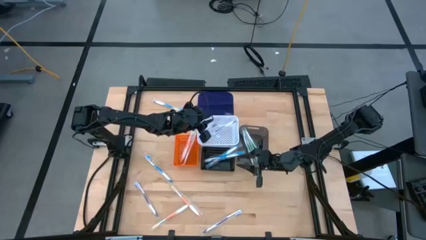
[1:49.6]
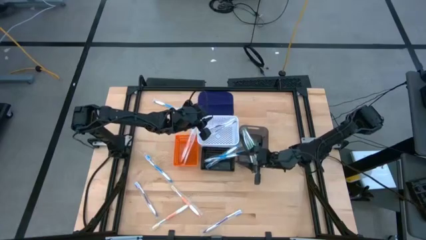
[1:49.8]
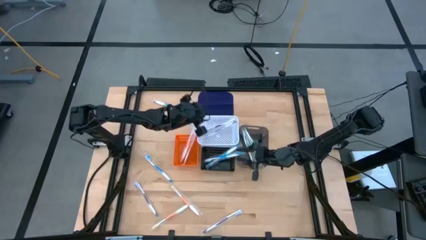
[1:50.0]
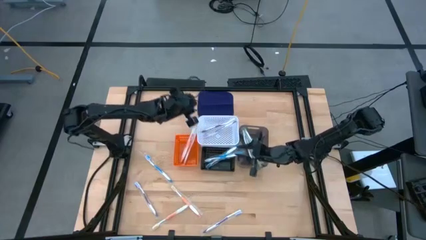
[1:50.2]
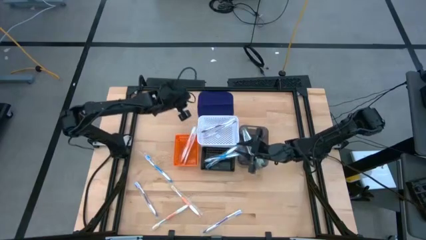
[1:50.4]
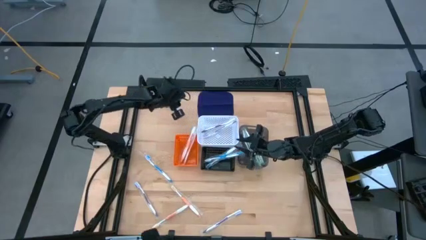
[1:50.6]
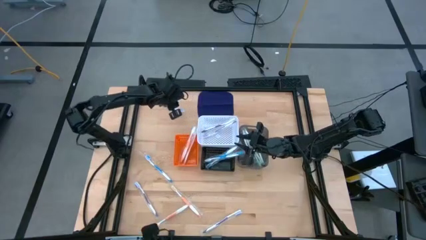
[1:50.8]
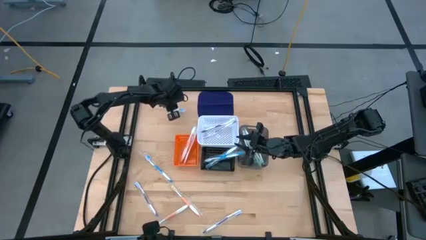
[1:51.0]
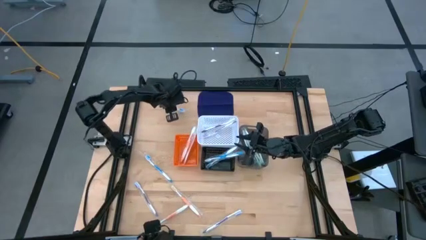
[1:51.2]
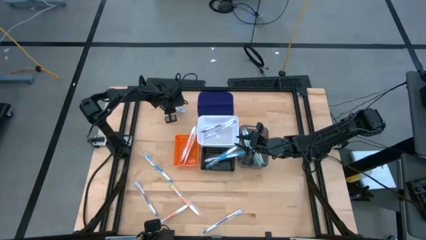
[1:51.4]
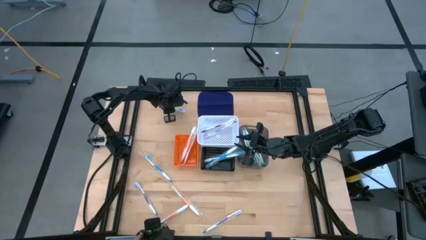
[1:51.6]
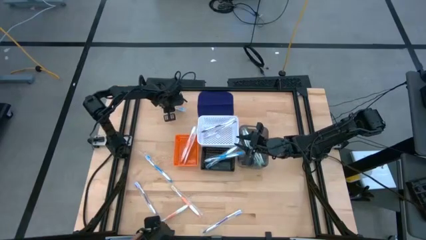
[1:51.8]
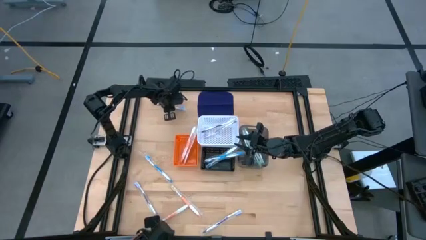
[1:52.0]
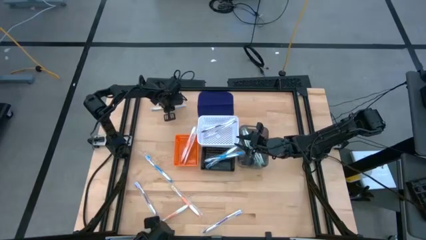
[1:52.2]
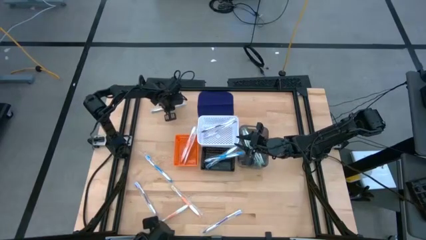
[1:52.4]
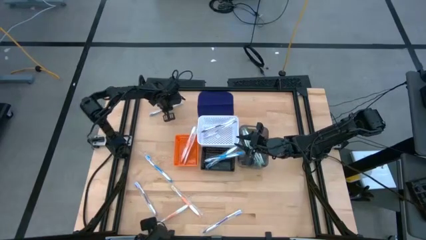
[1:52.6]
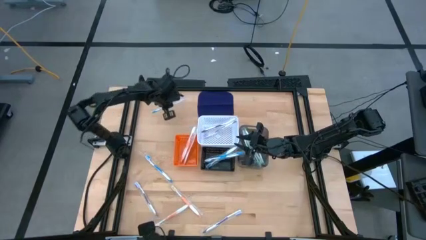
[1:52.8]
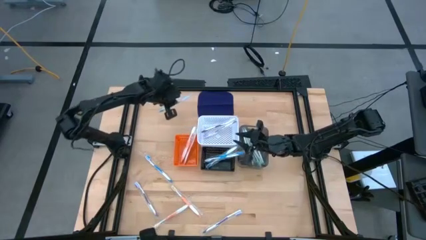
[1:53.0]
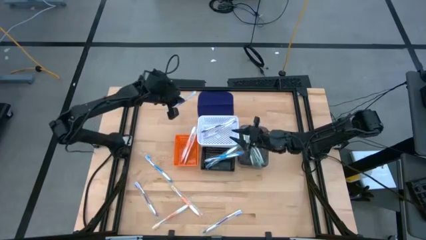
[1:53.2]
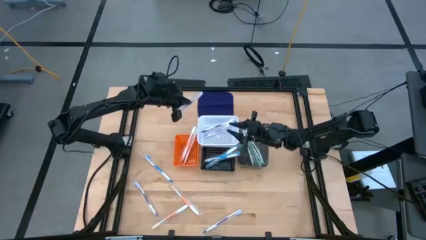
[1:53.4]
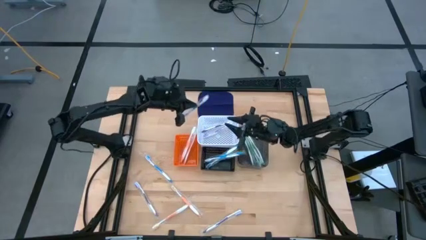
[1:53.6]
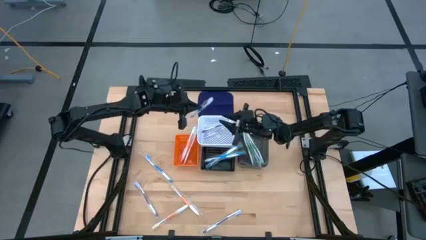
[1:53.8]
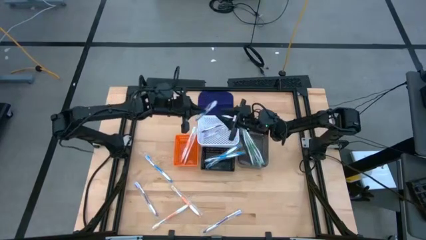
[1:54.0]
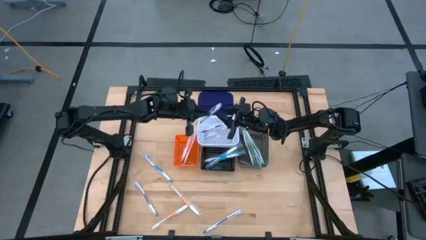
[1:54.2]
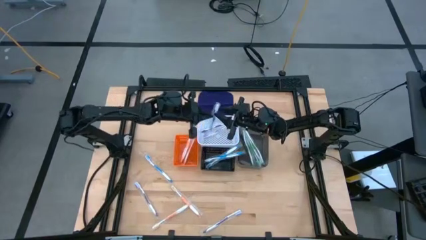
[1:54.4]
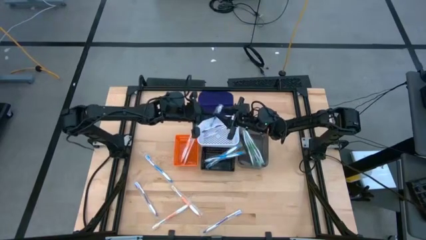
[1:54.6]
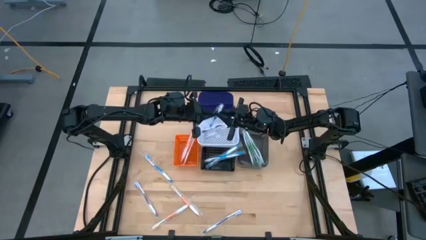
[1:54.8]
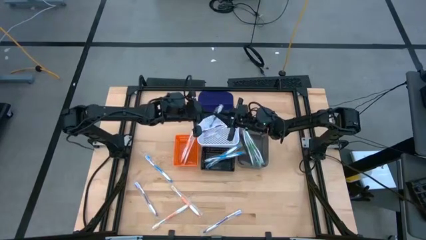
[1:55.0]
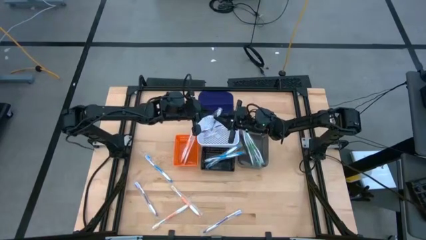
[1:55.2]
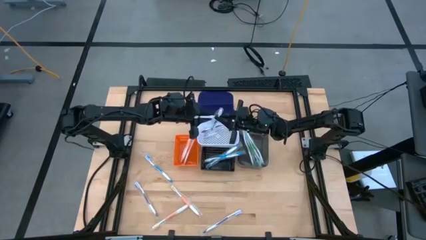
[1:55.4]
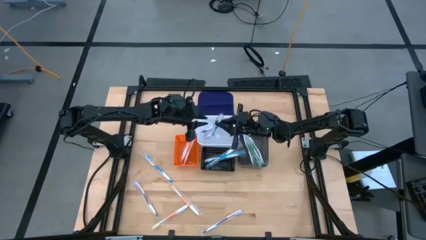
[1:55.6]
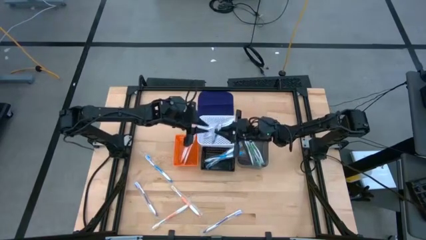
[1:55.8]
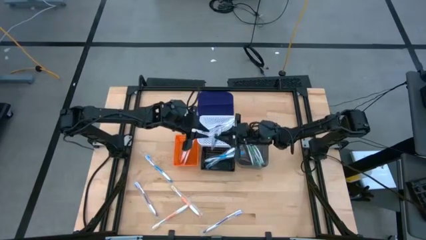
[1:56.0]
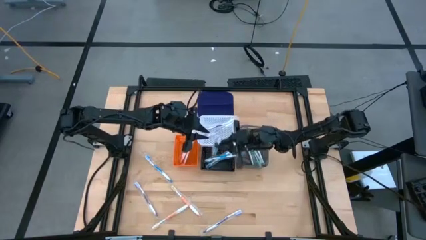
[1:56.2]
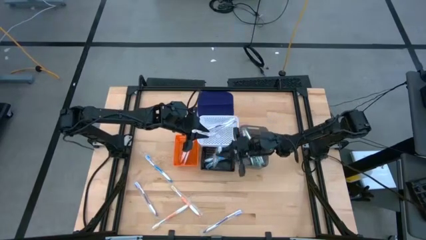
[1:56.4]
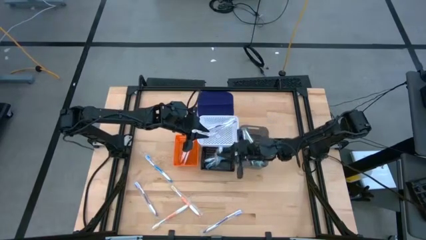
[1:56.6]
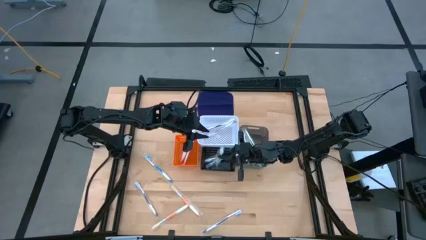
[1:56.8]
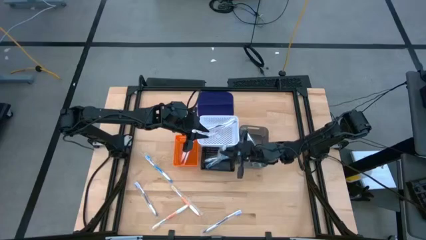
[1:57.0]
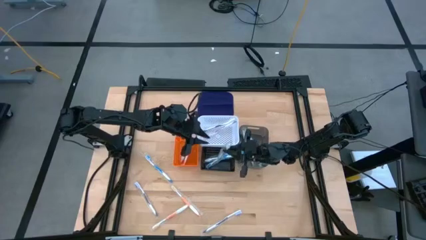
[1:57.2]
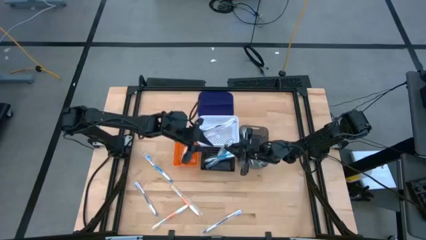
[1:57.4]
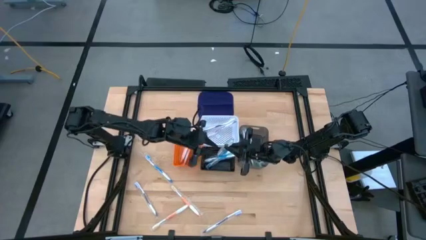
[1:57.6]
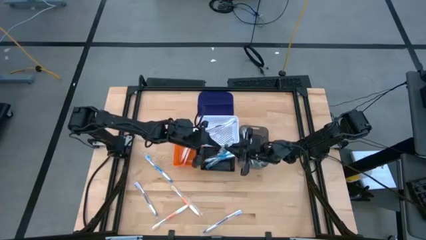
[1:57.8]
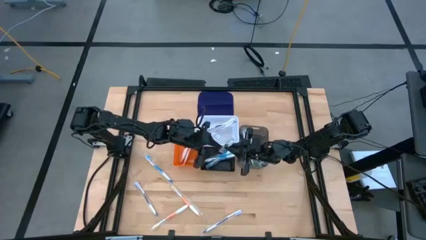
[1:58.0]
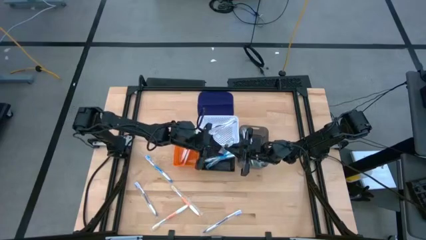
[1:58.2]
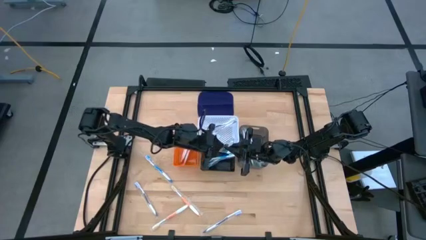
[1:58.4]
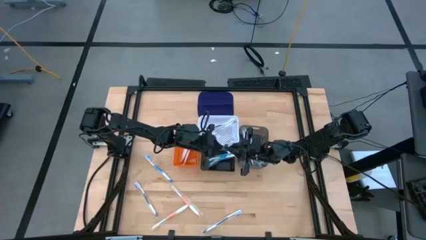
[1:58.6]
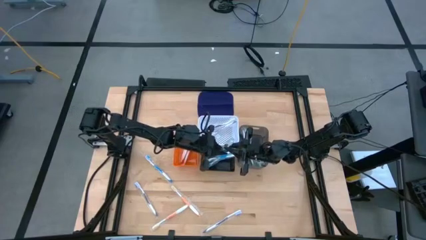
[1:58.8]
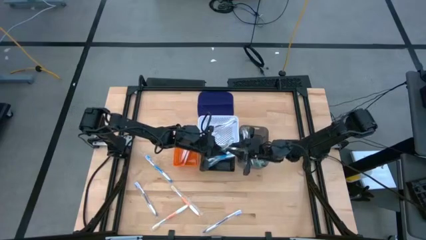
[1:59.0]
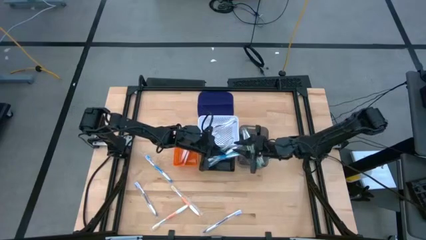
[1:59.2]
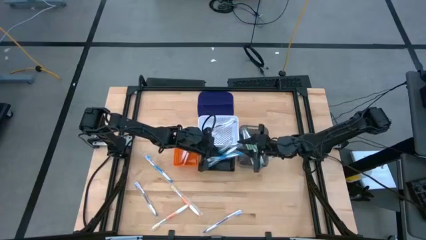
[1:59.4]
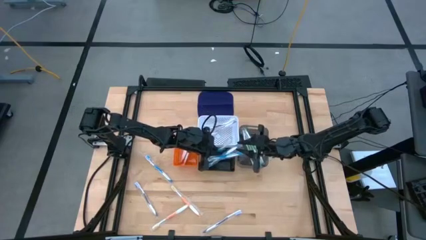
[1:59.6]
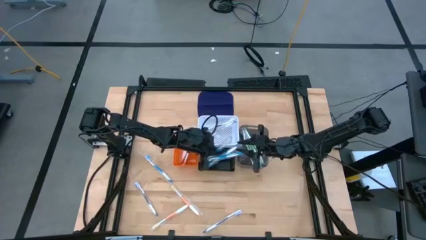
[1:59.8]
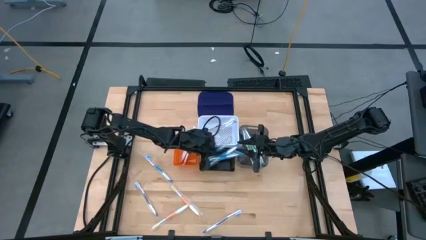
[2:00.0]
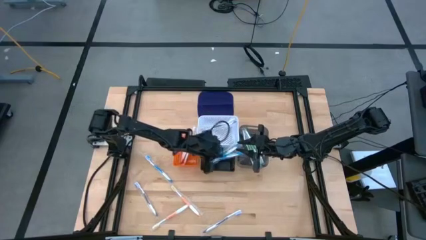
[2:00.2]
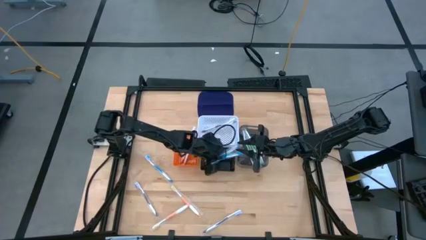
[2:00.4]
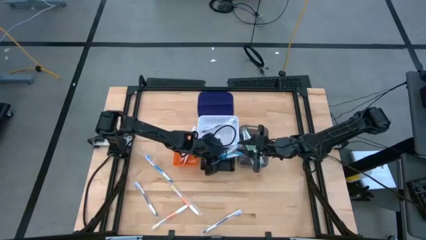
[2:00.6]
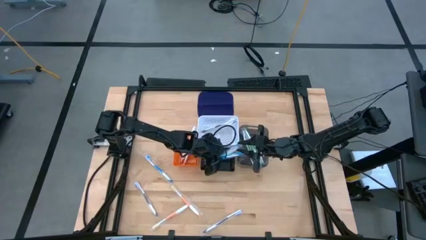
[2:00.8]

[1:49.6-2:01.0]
Task: Pick & Place Toothbrushes
Put the blue toothbrush into the black basket

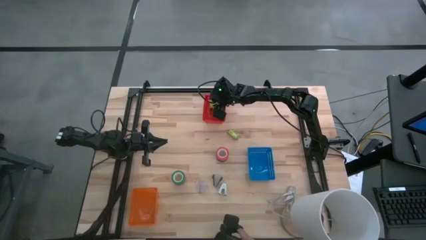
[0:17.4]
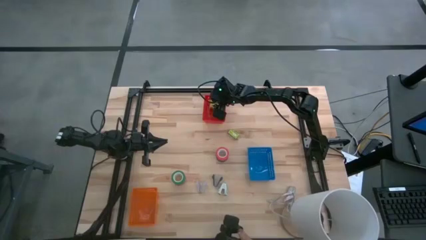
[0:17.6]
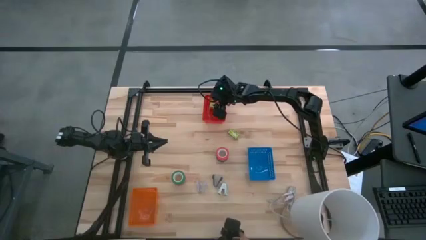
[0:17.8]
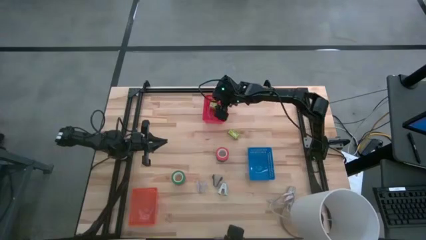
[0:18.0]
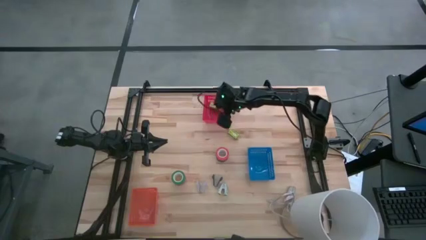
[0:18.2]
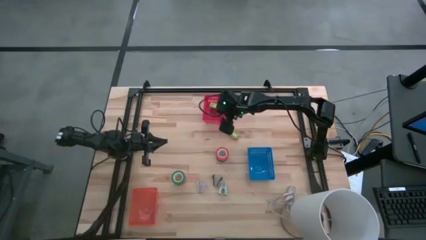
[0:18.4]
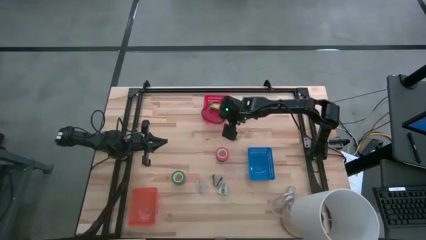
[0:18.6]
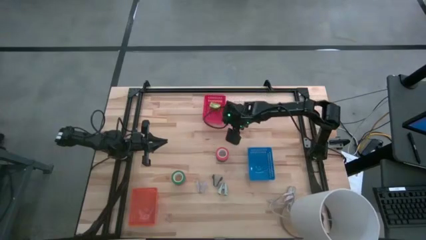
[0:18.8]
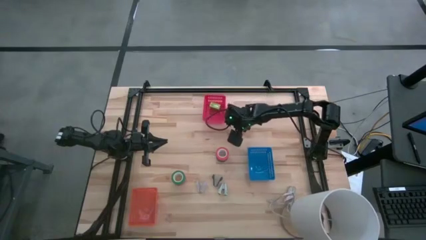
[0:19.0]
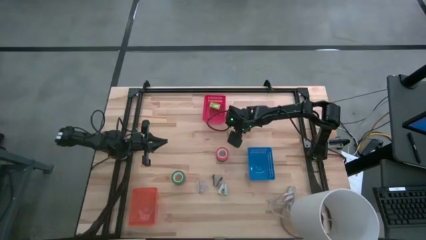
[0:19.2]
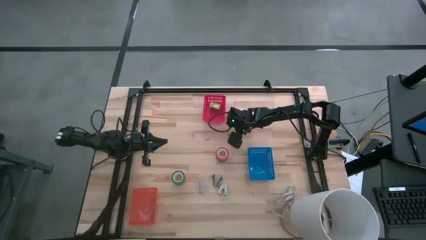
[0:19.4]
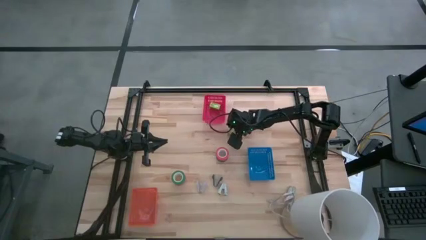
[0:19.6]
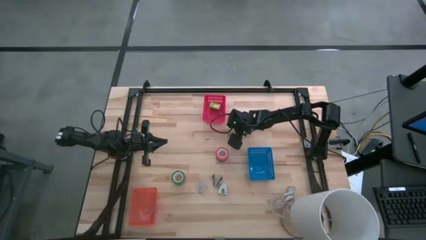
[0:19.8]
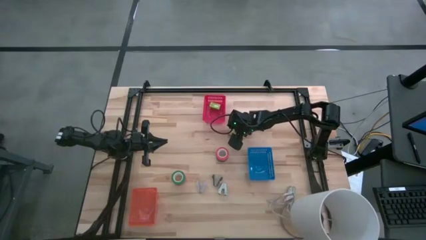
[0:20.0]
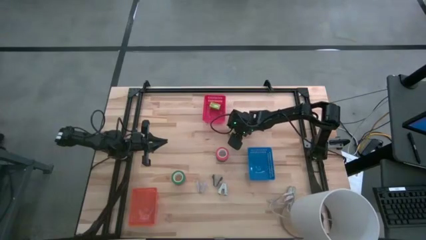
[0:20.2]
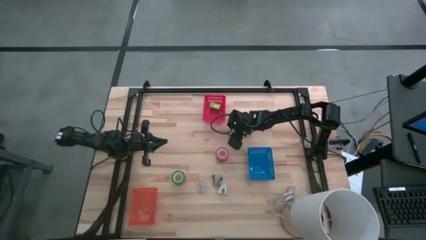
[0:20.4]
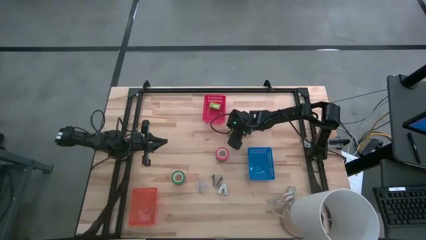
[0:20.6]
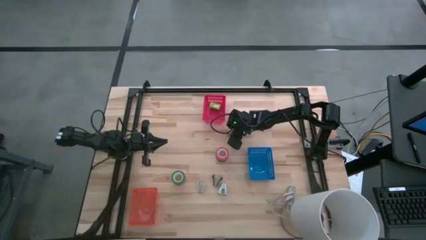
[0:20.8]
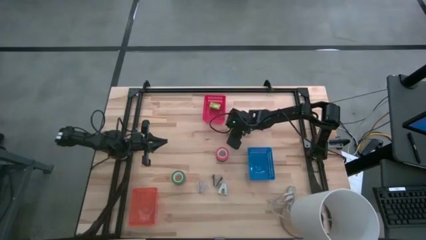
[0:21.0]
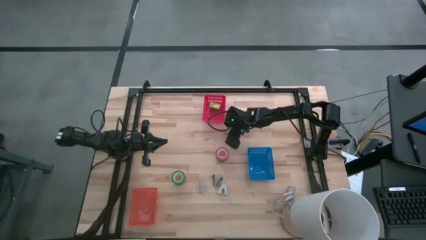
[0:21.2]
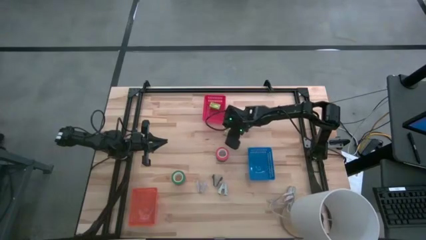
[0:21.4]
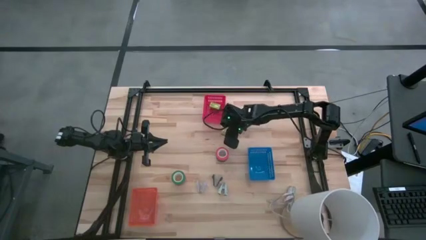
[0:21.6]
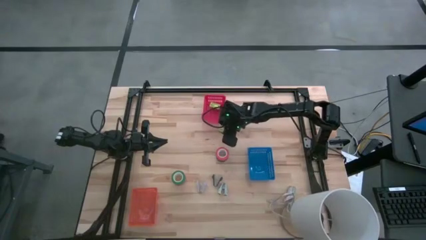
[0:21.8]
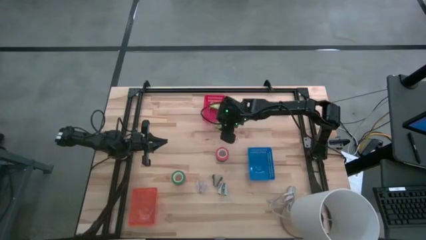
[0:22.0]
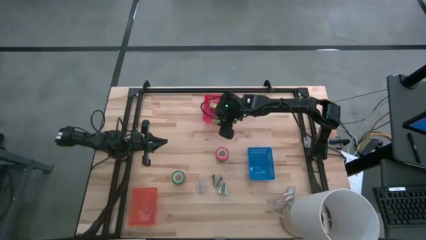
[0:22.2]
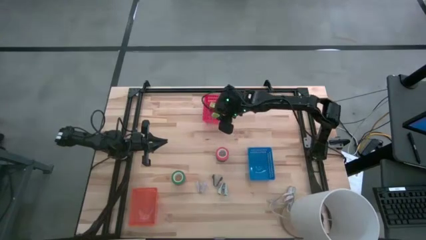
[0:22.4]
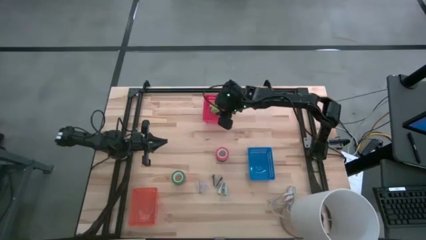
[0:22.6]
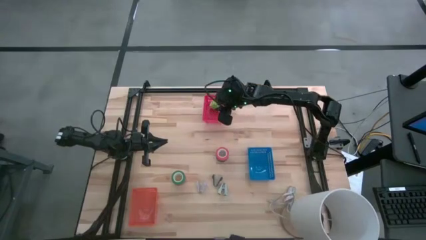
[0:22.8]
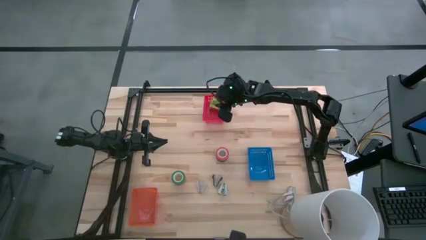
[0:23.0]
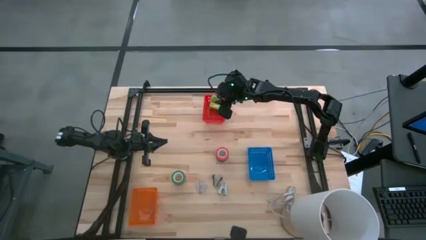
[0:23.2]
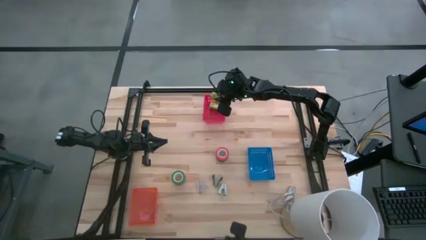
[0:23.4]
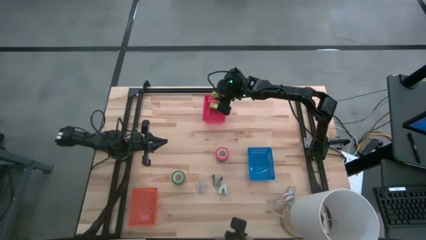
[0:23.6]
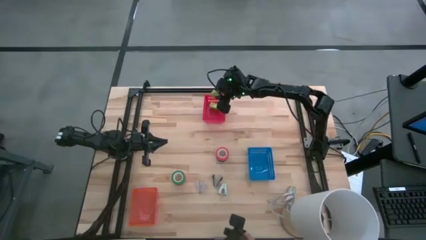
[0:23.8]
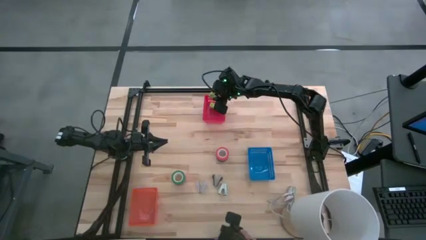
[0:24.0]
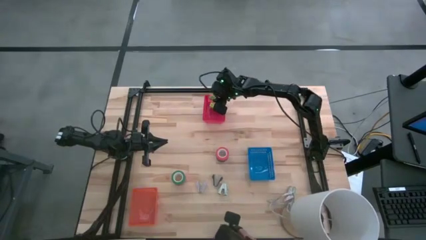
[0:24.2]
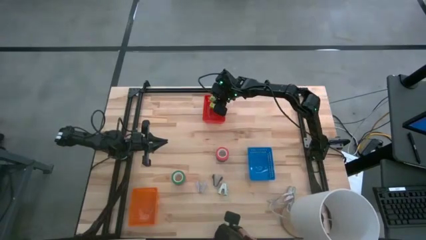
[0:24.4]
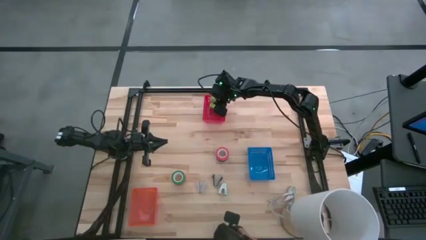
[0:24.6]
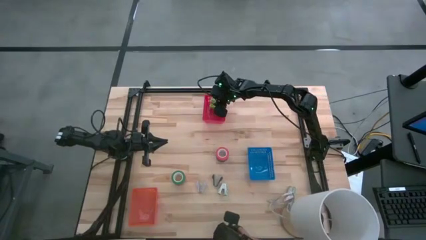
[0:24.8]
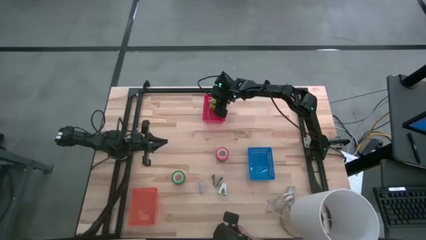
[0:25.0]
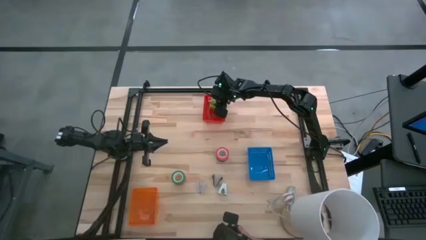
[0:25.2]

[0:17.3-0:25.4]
Task: Pick and place Stapler, Stapler remover, tape
Put the green staple box into the red bin
